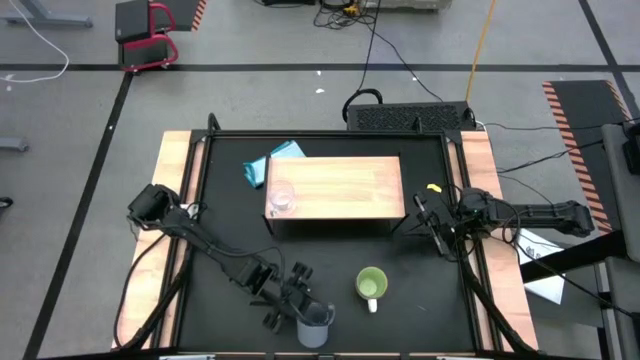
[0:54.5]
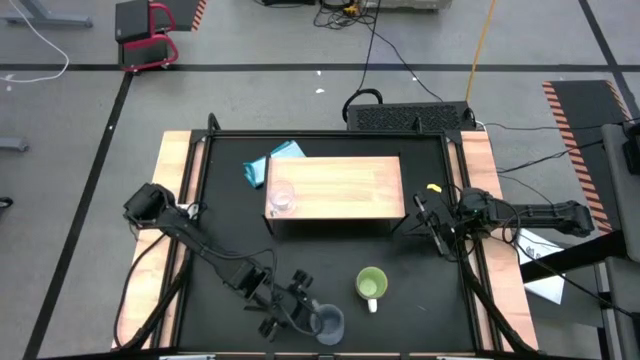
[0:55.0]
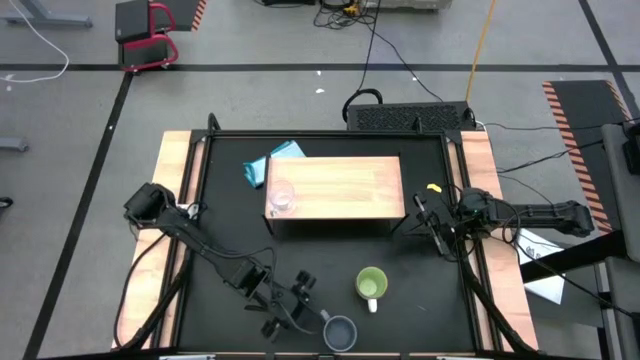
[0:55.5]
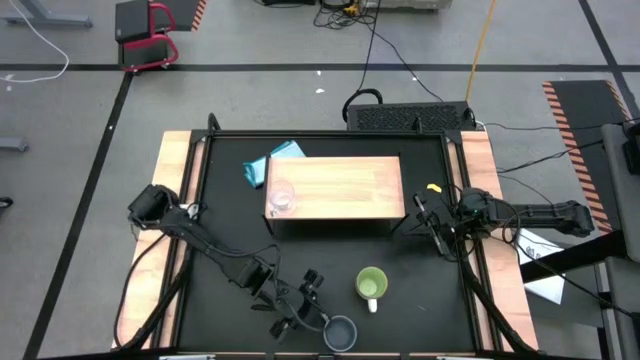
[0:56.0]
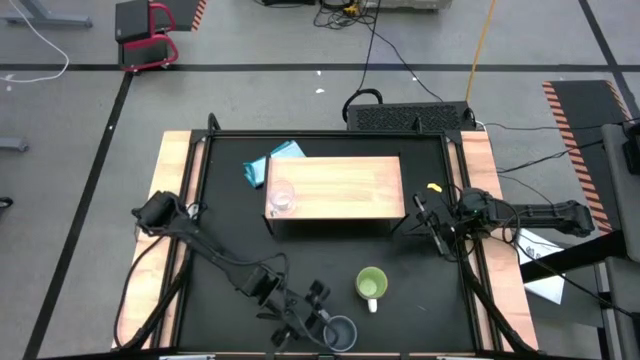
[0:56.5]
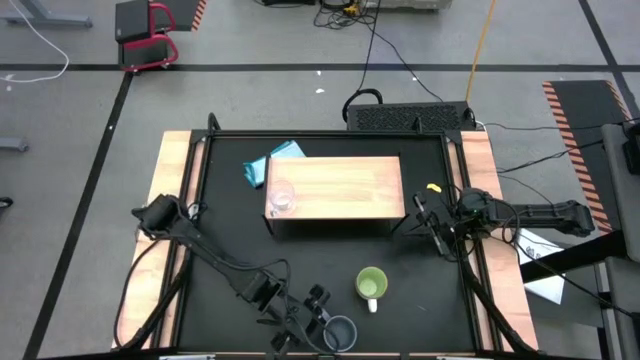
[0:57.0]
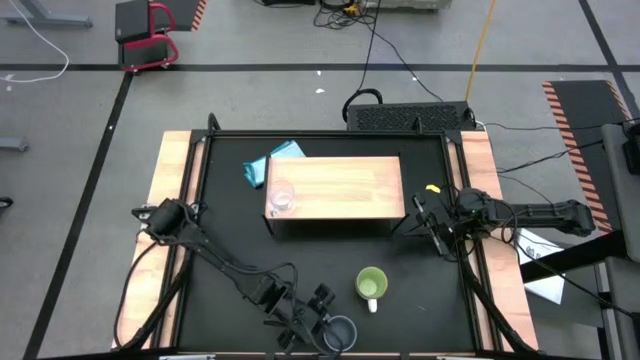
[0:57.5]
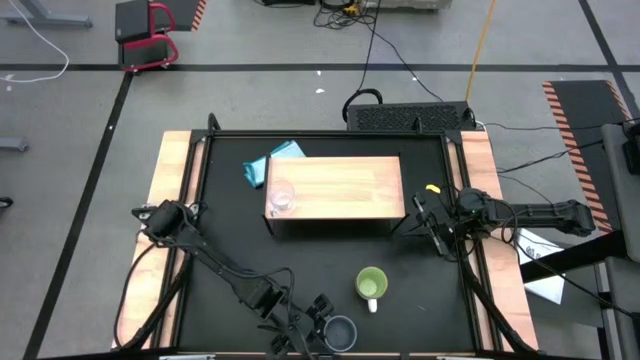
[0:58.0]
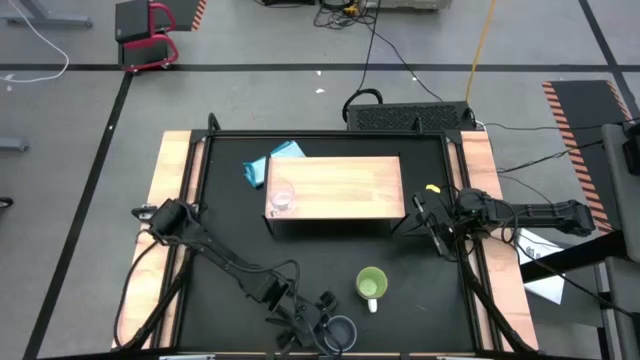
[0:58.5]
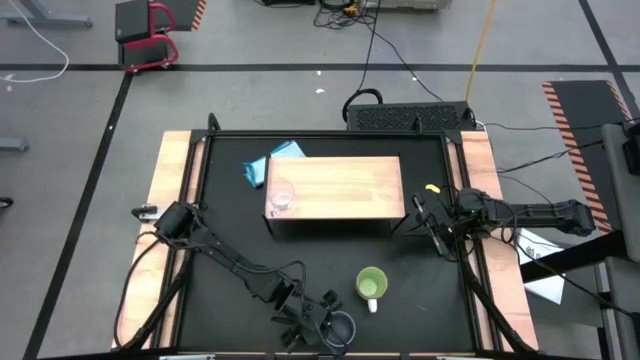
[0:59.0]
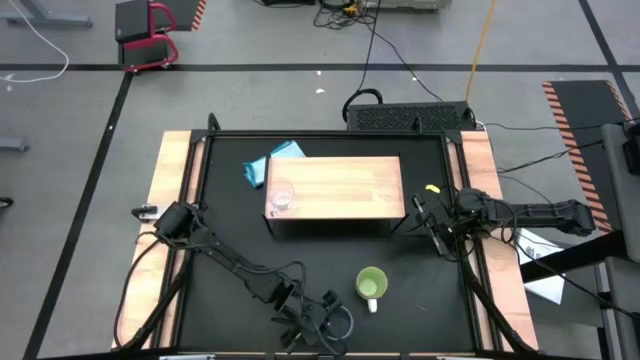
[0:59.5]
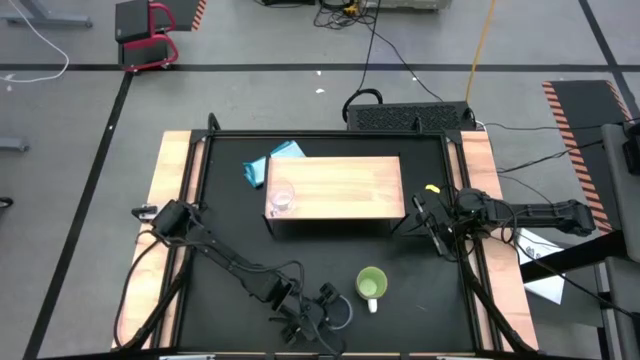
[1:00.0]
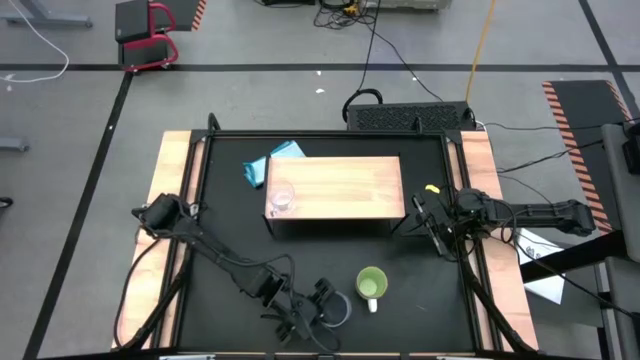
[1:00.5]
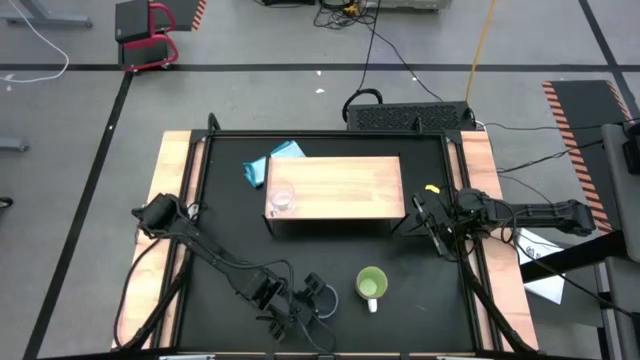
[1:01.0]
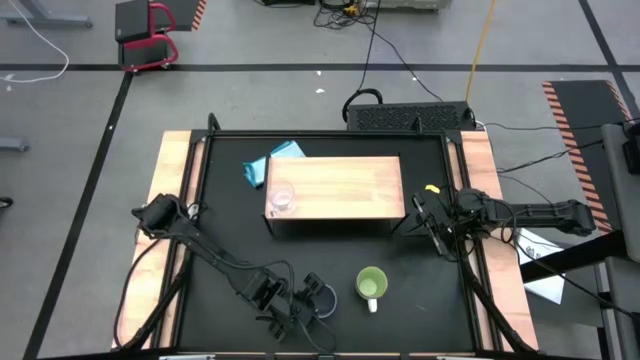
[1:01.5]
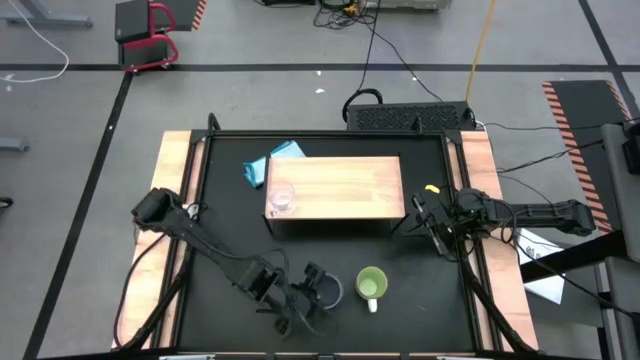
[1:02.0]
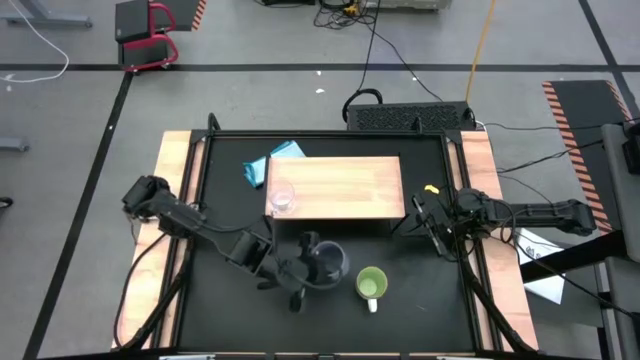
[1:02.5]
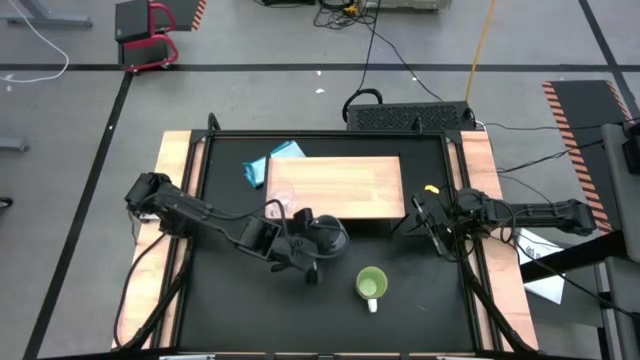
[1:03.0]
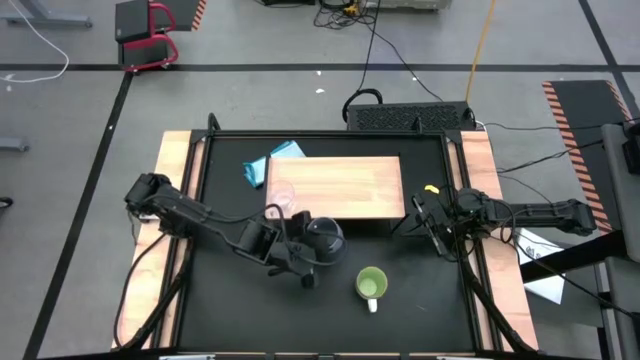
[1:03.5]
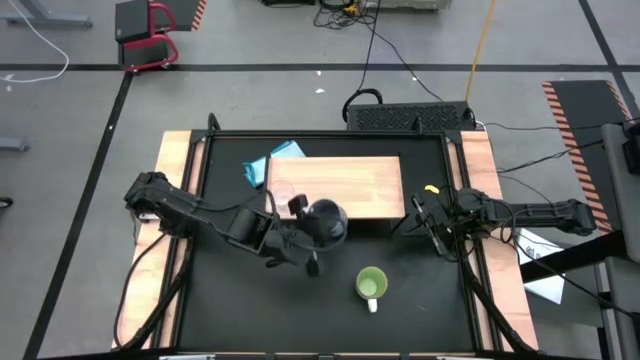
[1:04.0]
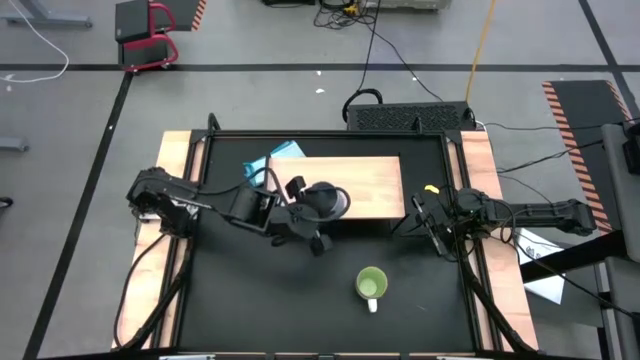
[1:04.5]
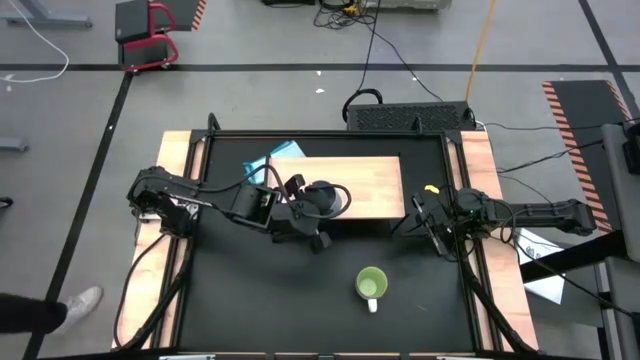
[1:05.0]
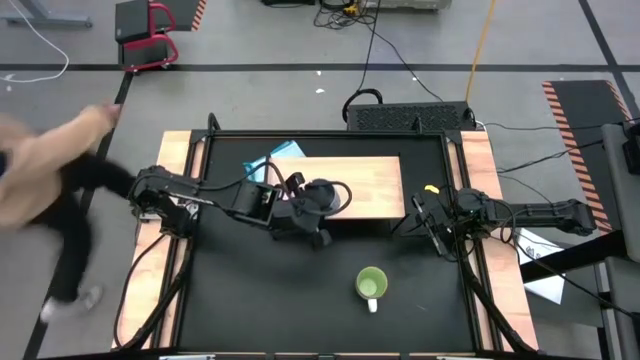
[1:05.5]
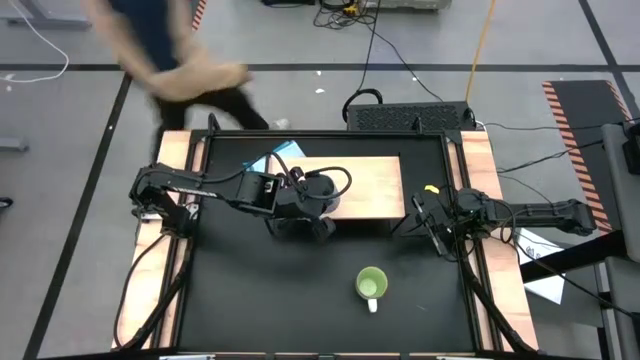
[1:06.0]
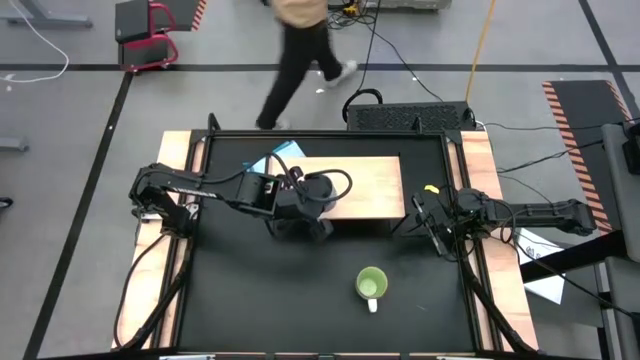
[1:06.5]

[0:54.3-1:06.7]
Task: Stack small to large cups/mugs on shelf
Put the gray mug on the shelf
